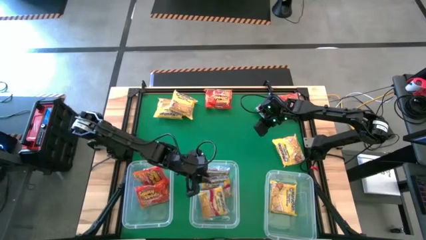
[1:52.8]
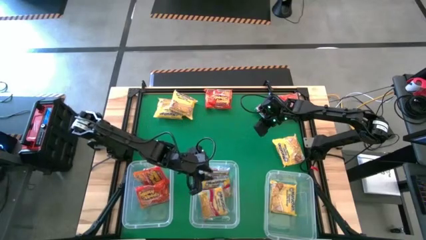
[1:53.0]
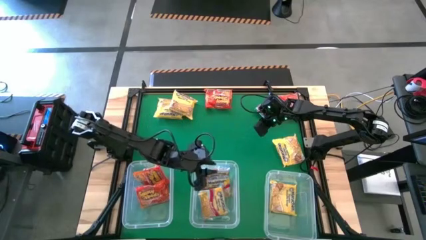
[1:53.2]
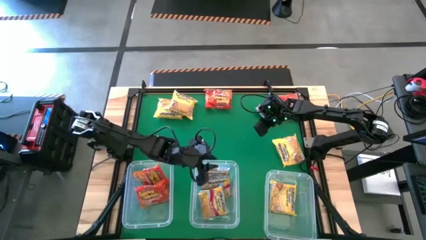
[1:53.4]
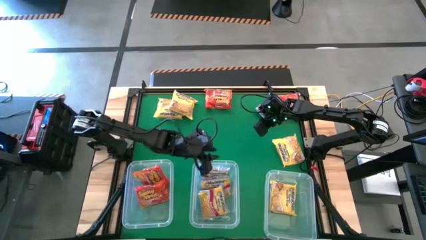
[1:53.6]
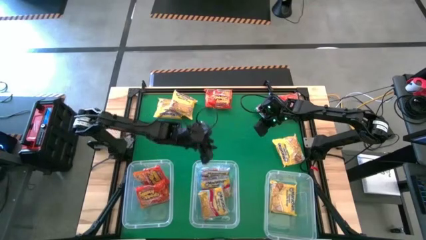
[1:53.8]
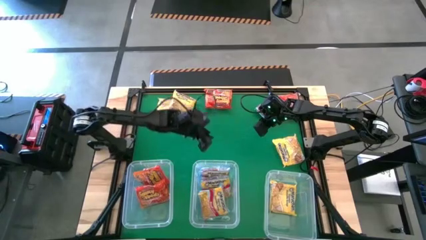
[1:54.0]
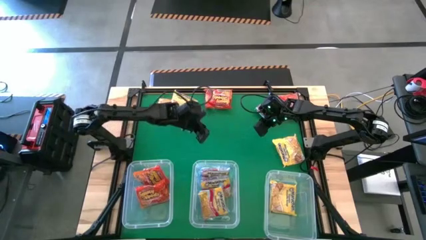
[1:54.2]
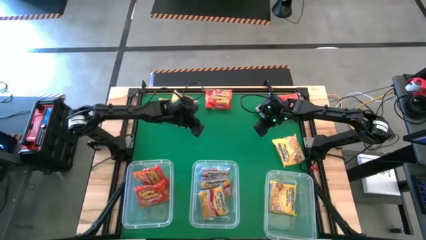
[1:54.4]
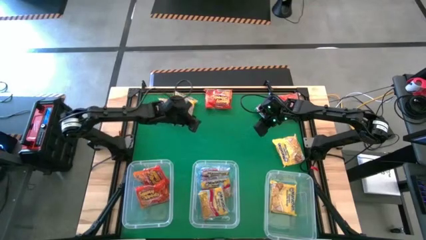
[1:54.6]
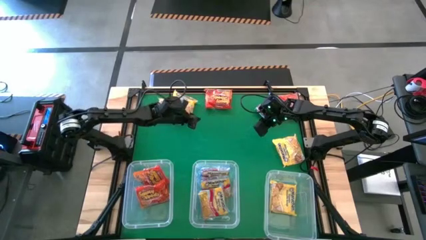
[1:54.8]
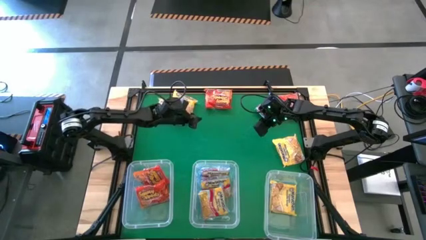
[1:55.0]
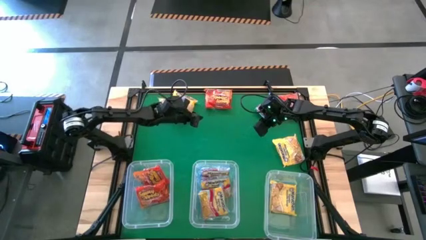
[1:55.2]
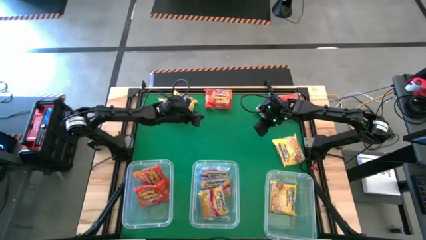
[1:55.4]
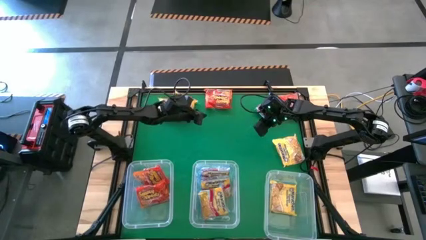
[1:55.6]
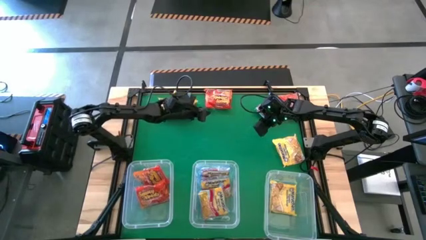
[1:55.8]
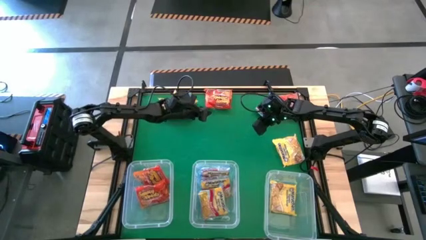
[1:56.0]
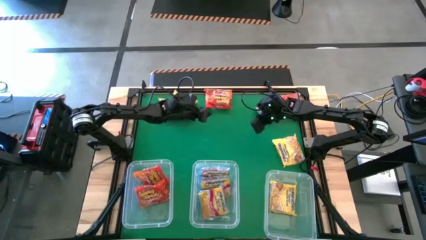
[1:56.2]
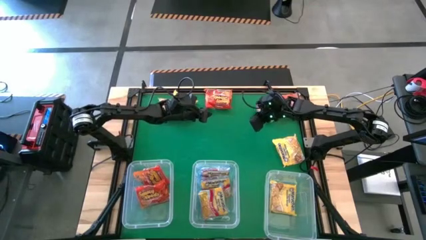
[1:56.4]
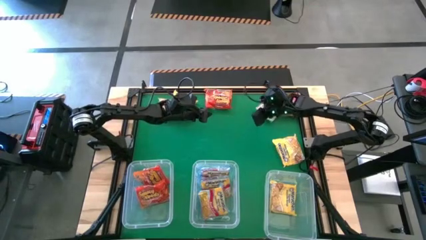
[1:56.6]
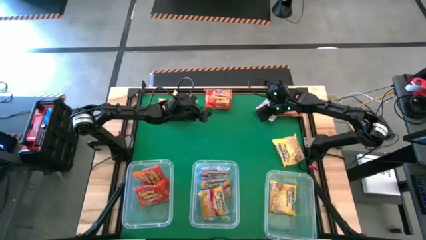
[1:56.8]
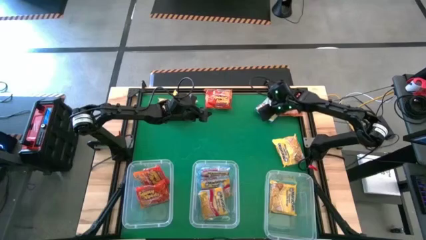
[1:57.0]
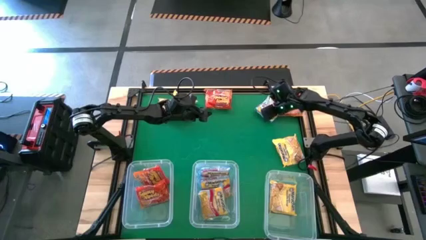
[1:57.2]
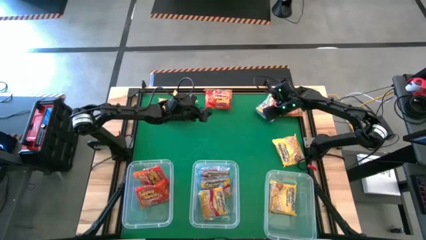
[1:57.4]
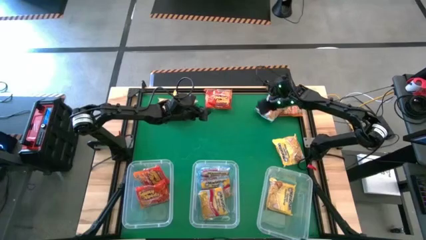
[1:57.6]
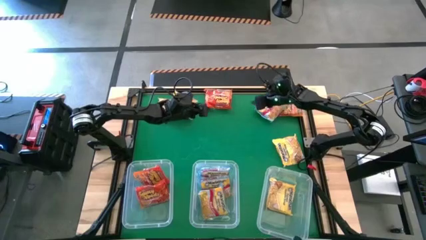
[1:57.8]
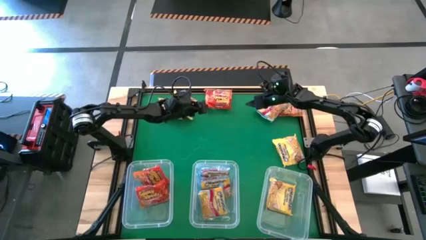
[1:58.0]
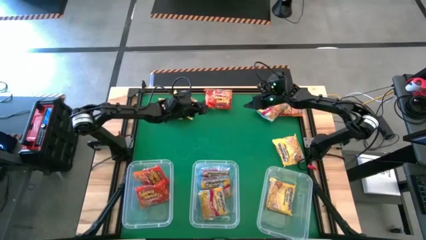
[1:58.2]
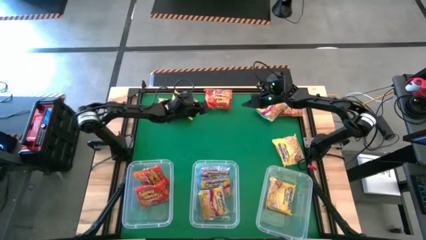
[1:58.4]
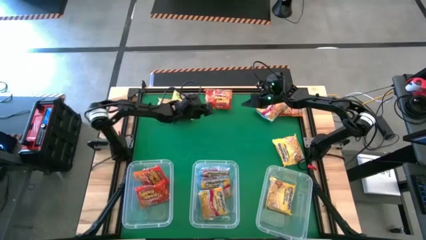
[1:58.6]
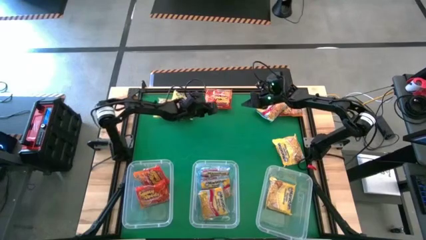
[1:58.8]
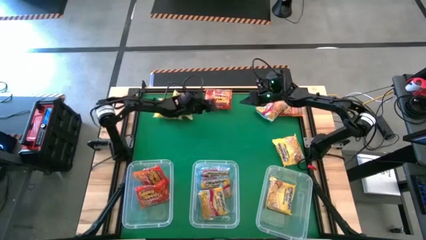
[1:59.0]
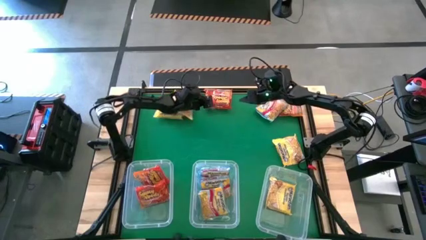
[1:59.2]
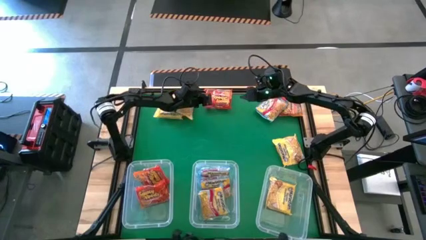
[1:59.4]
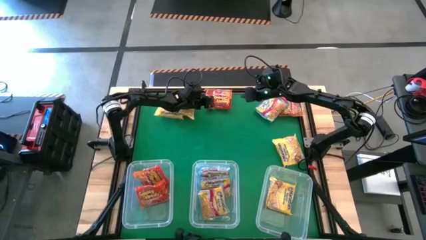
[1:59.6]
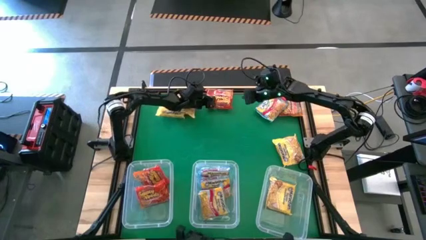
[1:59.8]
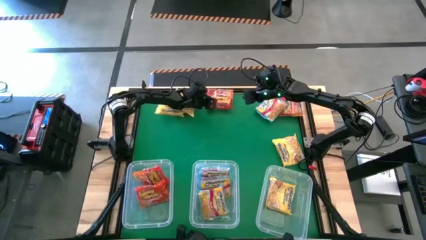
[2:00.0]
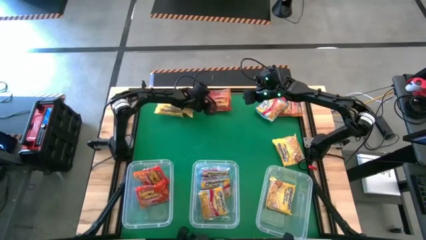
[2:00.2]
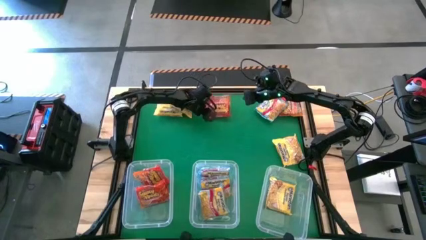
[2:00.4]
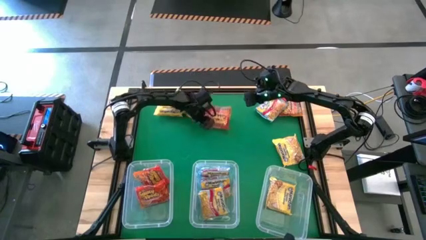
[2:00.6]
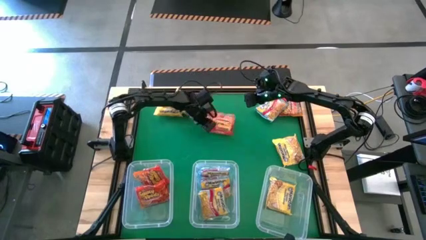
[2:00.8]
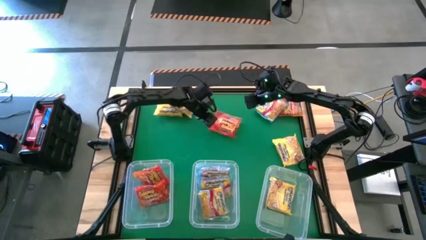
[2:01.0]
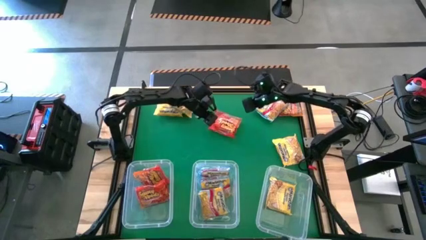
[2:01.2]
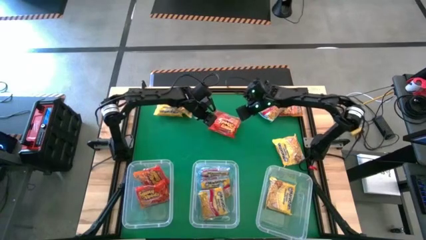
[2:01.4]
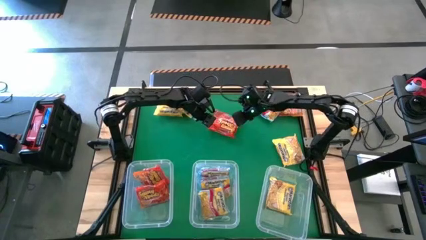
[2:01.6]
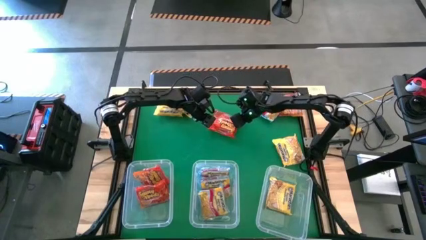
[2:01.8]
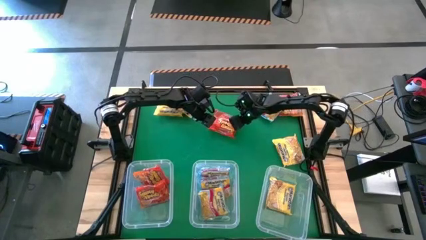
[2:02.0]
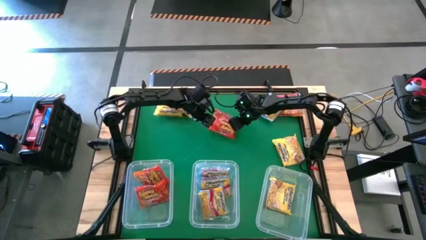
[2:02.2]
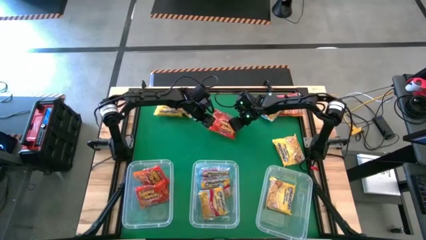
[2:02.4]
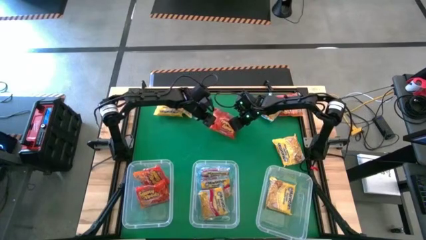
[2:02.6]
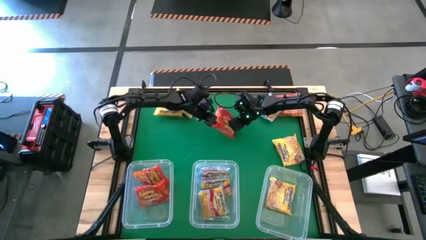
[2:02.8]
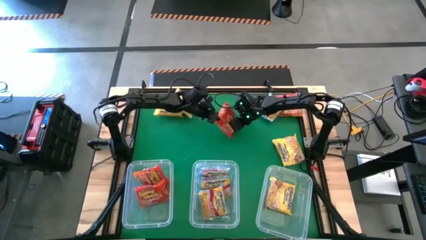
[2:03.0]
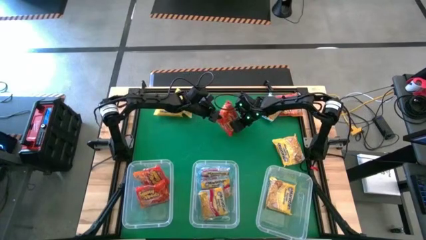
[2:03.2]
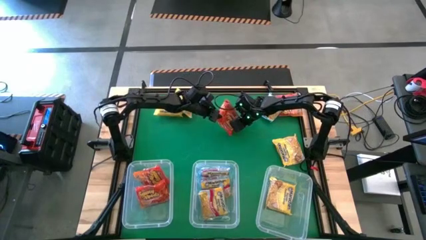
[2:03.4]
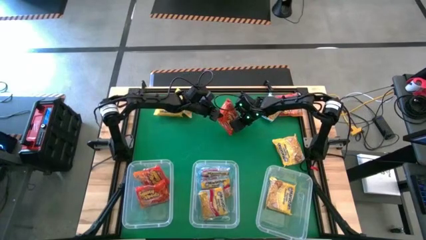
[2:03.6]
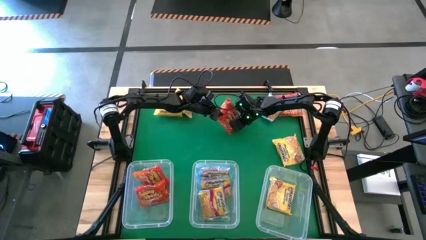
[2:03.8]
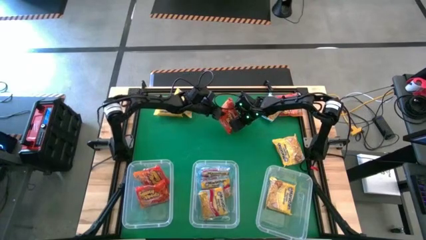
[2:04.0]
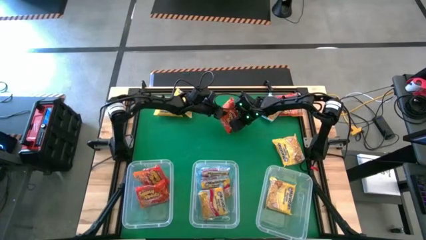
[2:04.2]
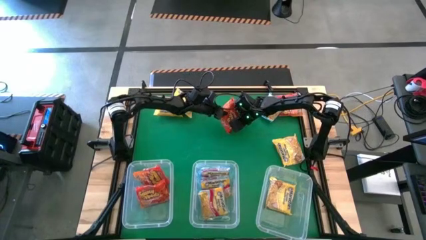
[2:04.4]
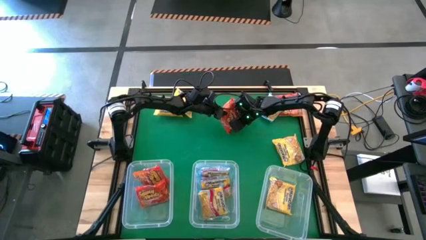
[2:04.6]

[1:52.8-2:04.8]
Task: Sort Maruchan noodles
Put the orange noodle pack into the left transparent bin
